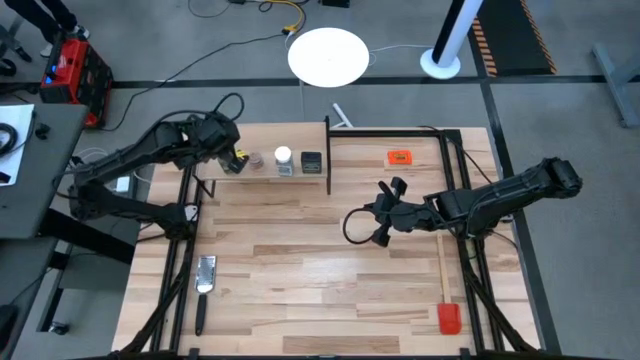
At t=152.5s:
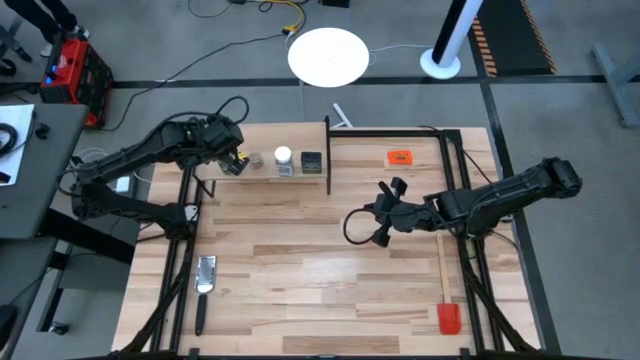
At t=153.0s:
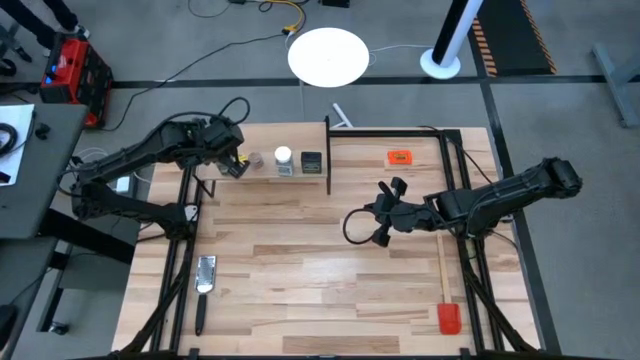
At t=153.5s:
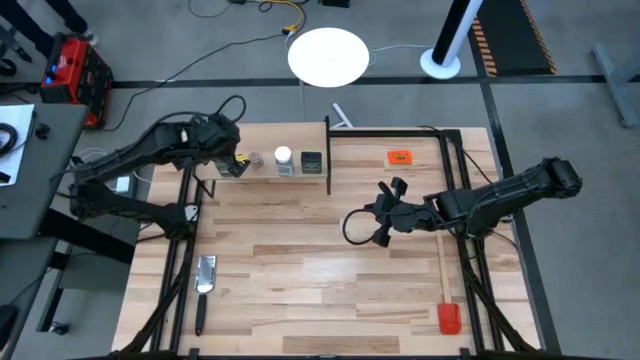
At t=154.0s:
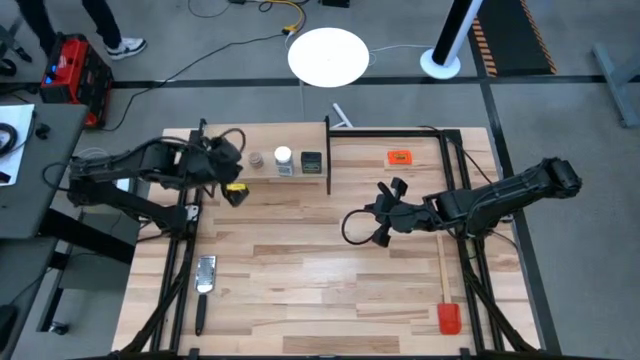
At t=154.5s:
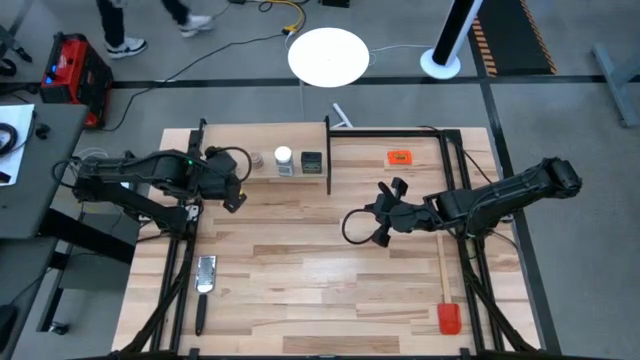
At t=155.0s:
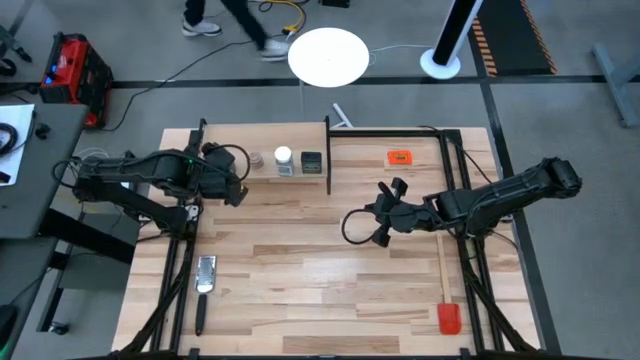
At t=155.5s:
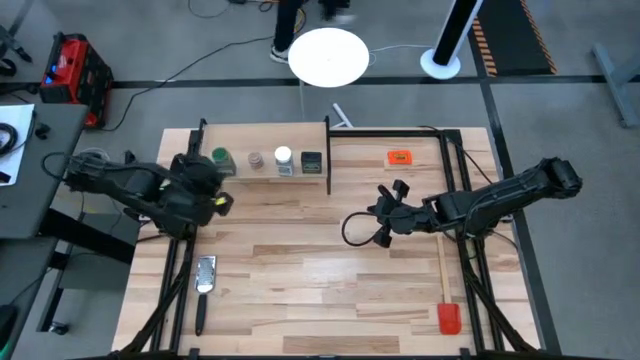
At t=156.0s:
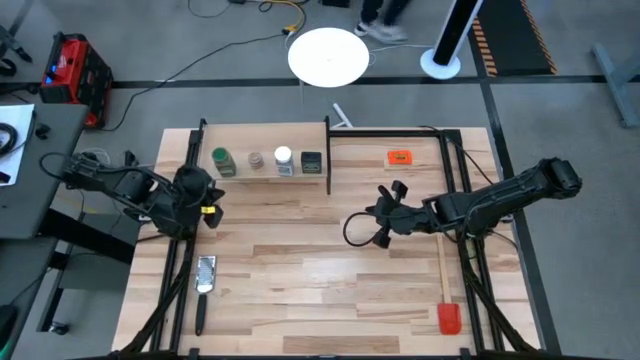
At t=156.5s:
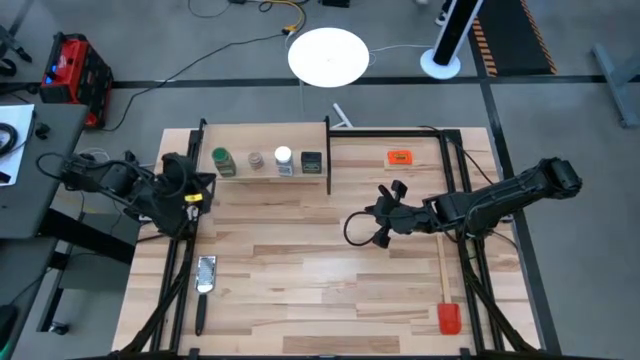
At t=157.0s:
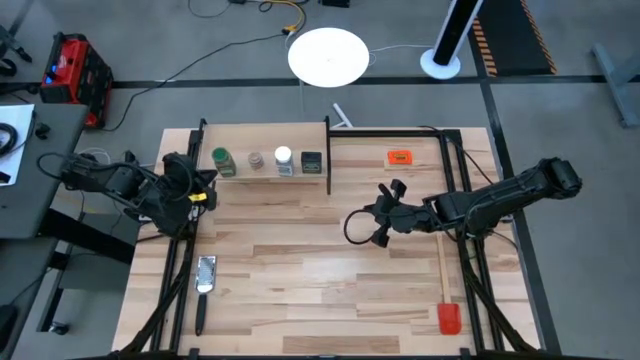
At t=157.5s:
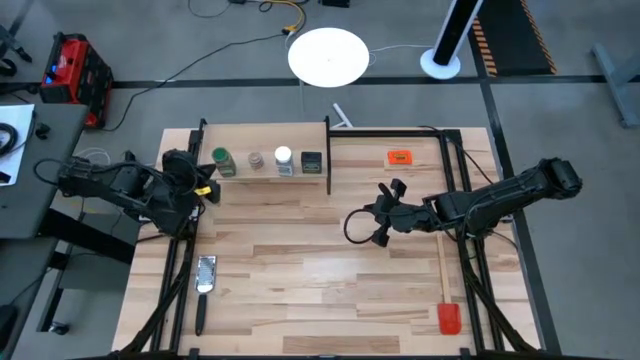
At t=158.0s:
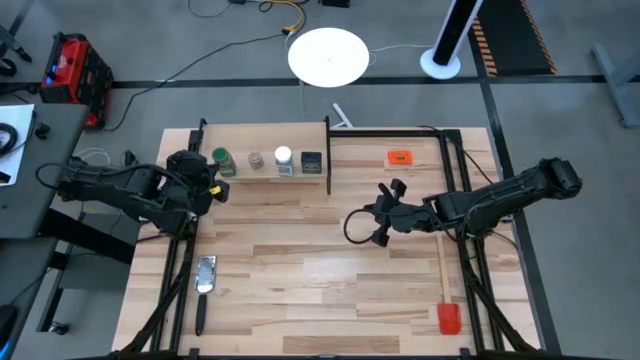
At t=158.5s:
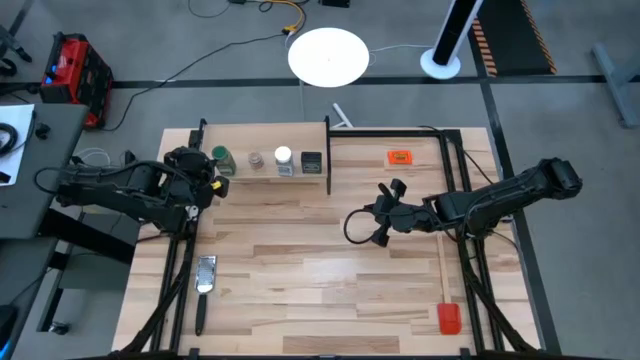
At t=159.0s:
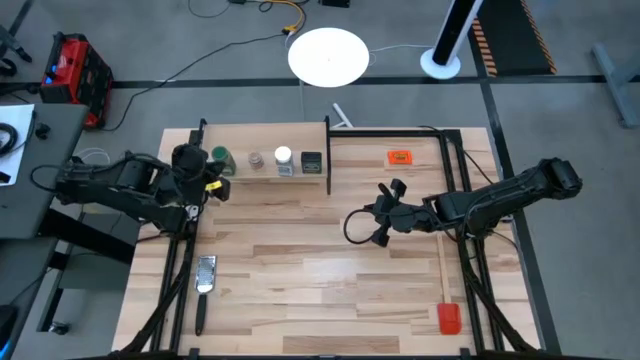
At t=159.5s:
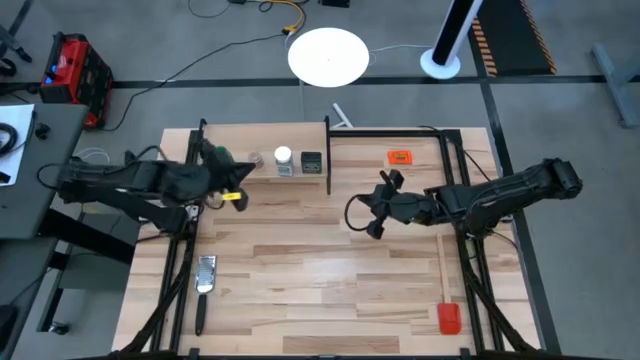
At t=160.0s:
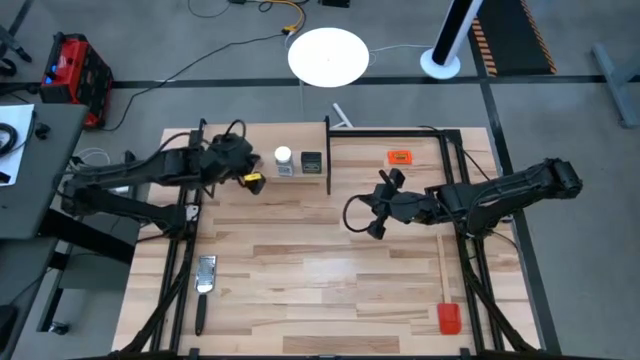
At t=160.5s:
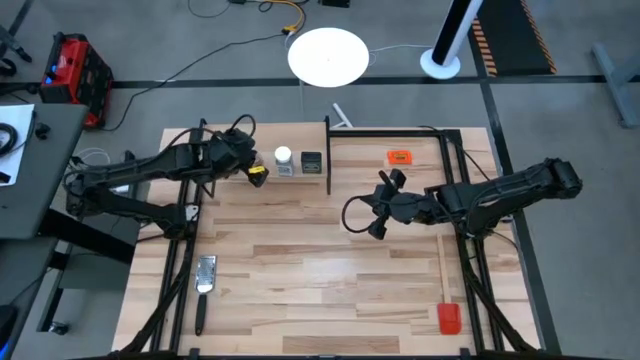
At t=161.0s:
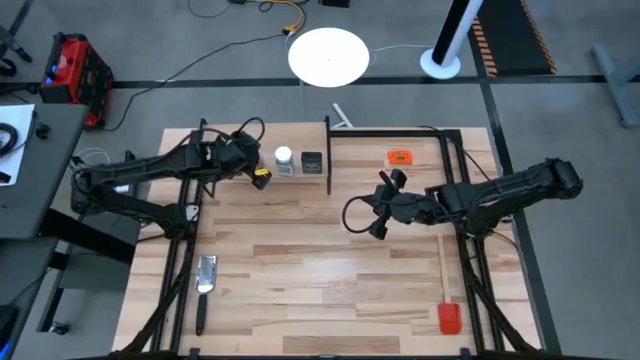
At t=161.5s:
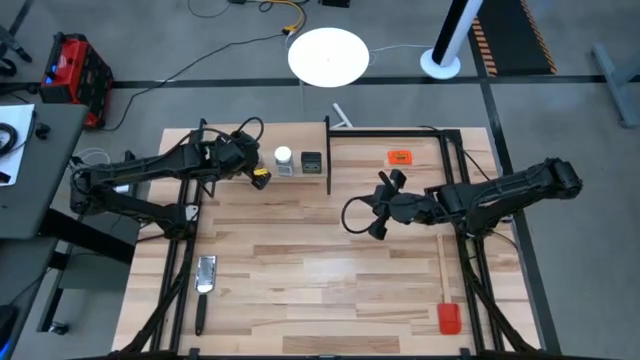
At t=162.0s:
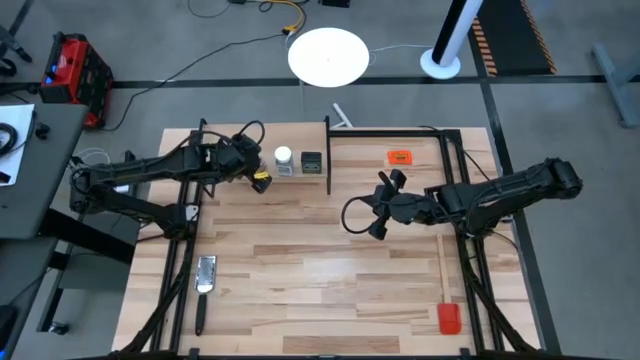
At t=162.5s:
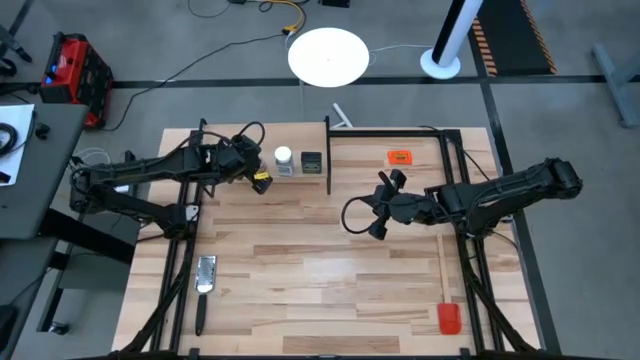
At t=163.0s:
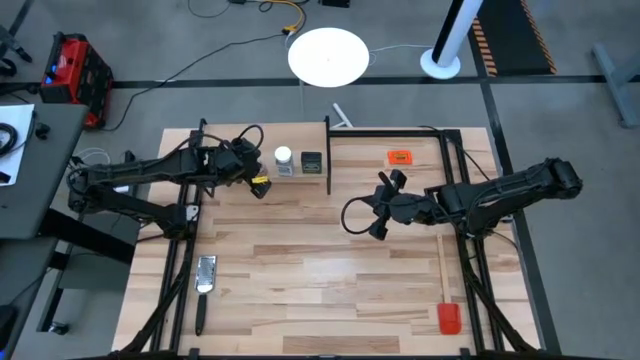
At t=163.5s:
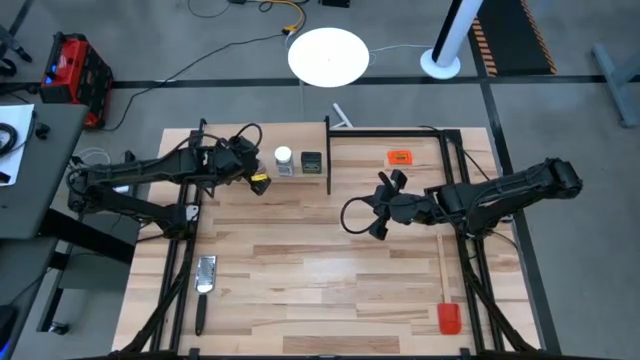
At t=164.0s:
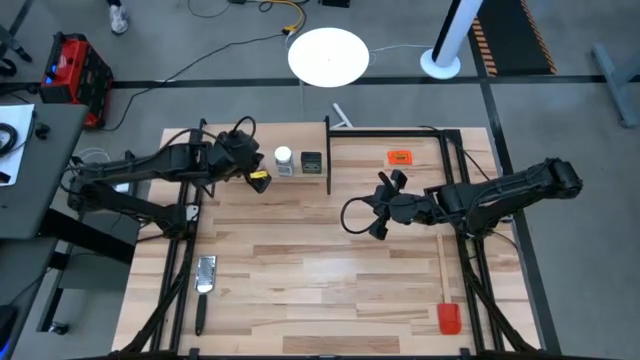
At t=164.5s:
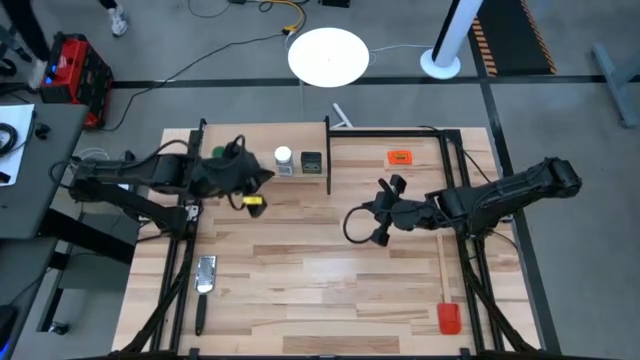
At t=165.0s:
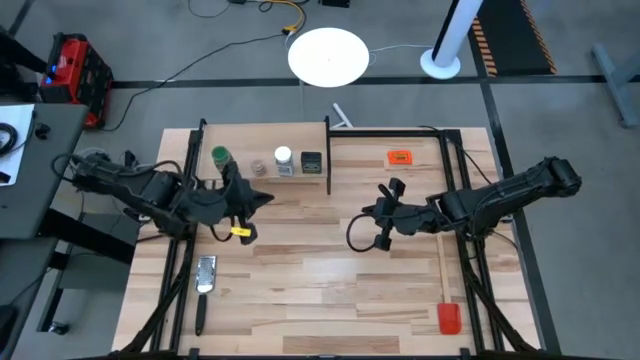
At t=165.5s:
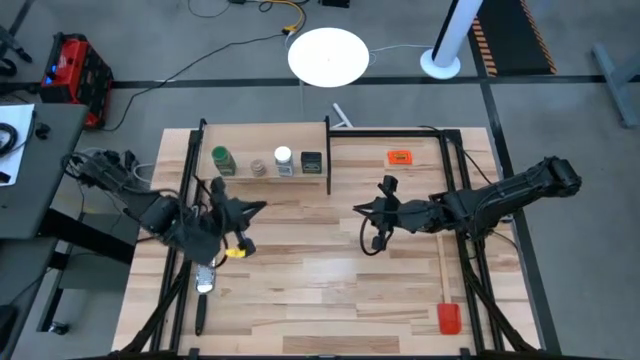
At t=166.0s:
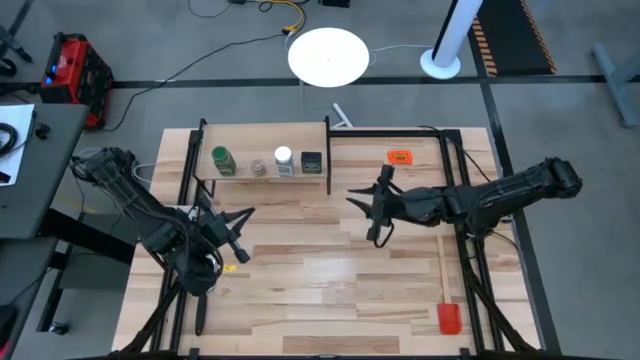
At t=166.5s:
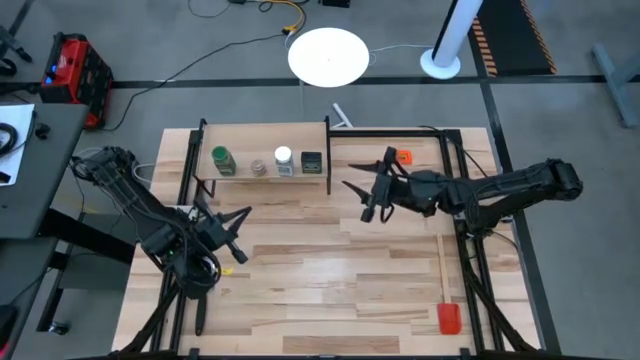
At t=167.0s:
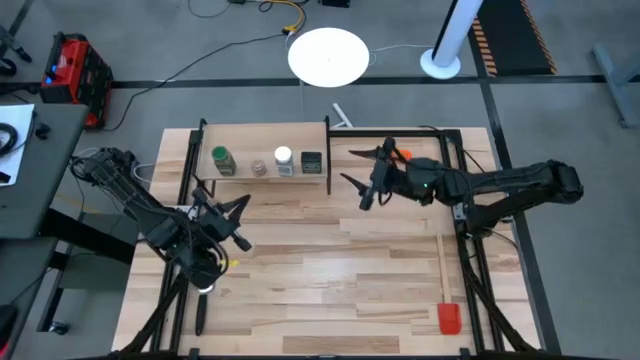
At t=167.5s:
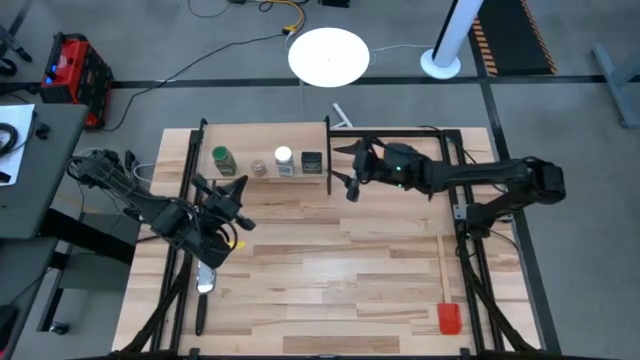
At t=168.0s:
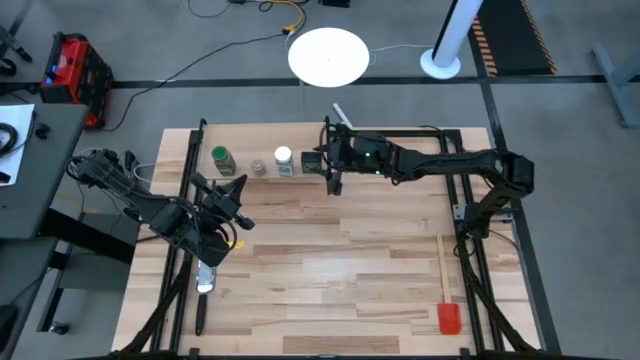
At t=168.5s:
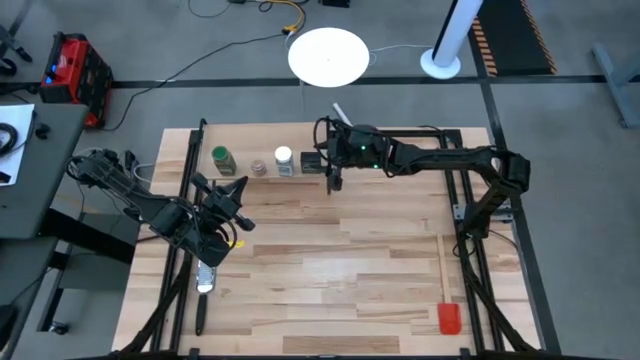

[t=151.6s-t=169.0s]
Task: Shelf spices
Remove the green seasoning bottle from the shelf

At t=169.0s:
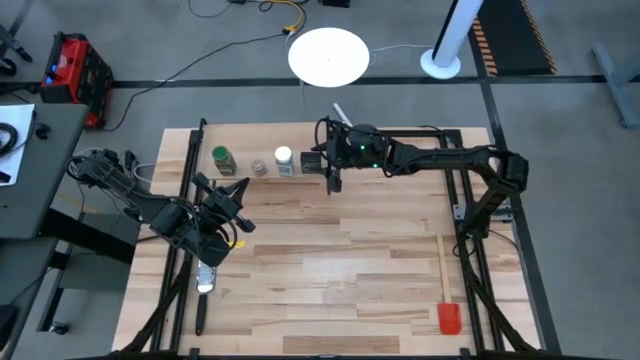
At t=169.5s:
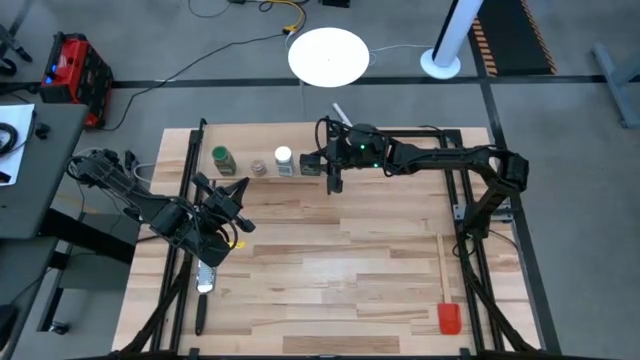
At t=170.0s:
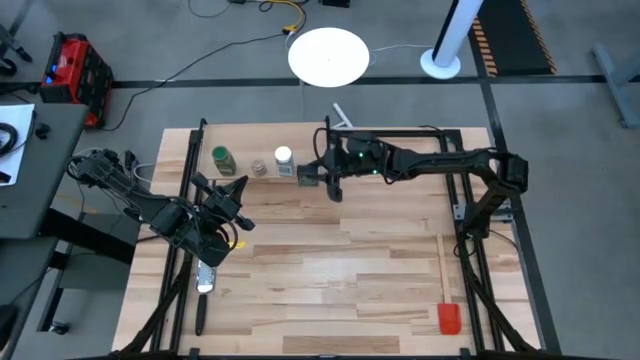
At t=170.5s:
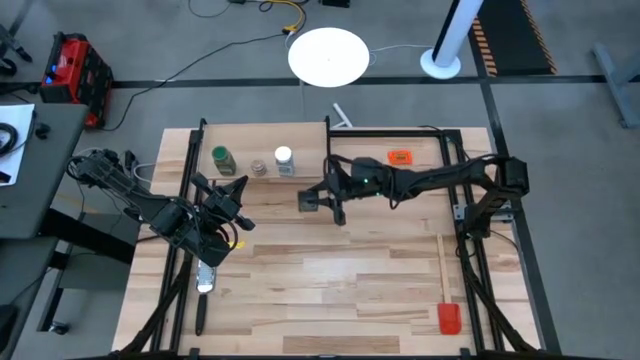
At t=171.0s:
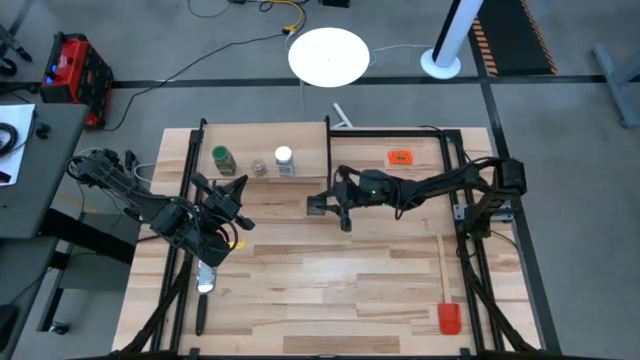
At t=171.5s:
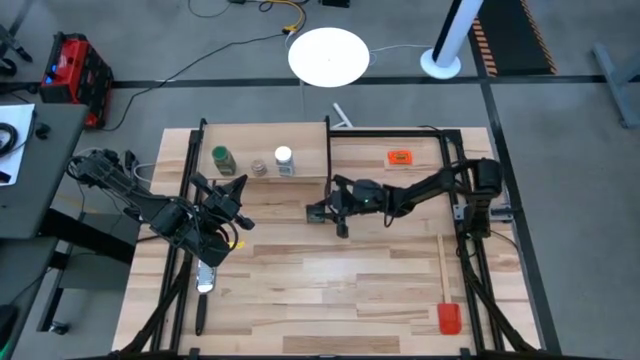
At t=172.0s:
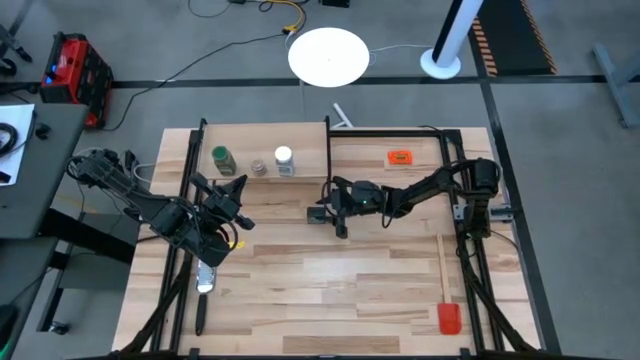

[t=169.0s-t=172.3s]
Remove the black seasoning can from the shelf

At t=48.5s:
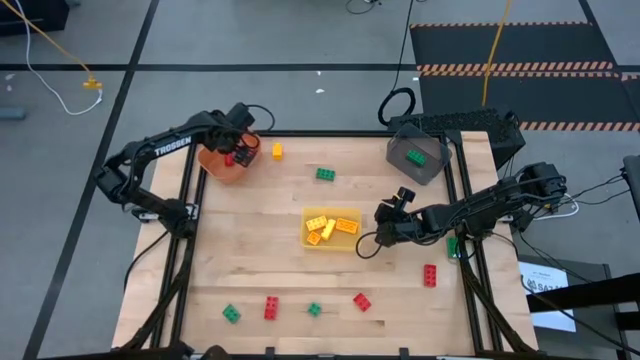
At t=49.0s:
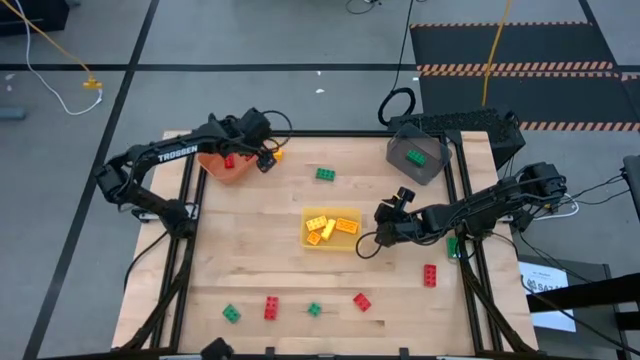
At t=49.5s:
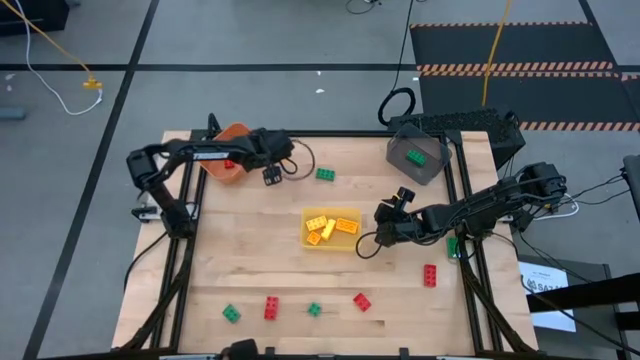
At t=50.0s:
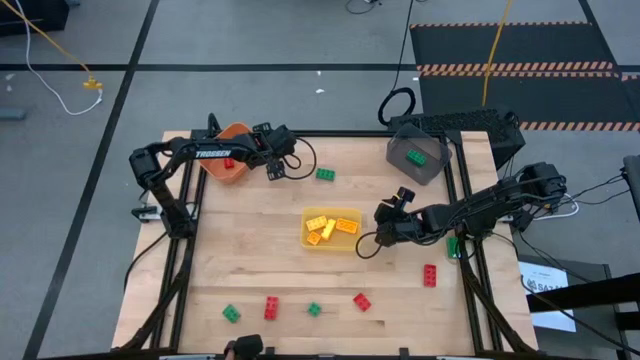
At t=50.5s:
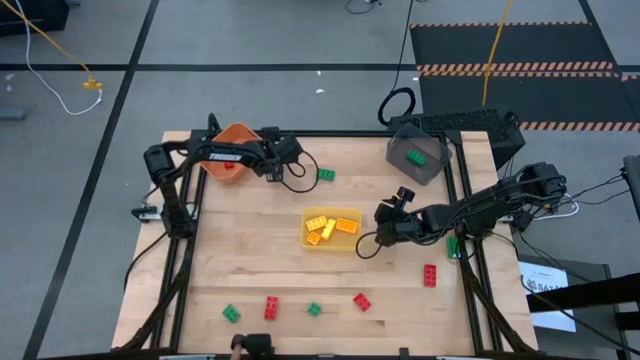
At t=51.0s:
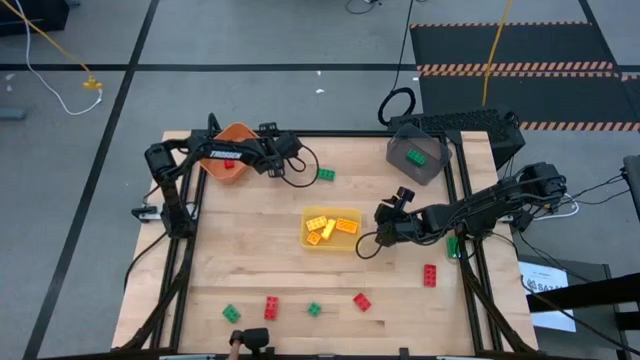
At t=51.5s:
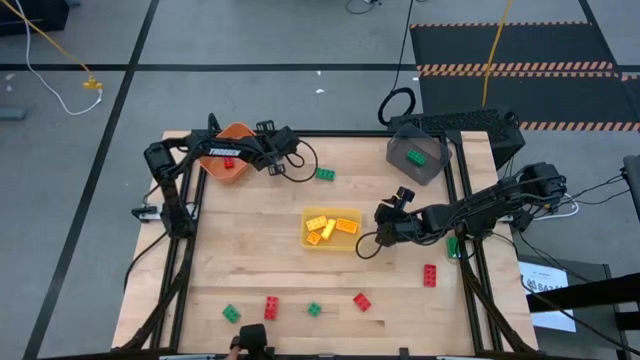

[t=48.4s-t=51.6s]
Task: Sort & place blocks by color
Put the yellow 1-stud game piece into the yellow bin
